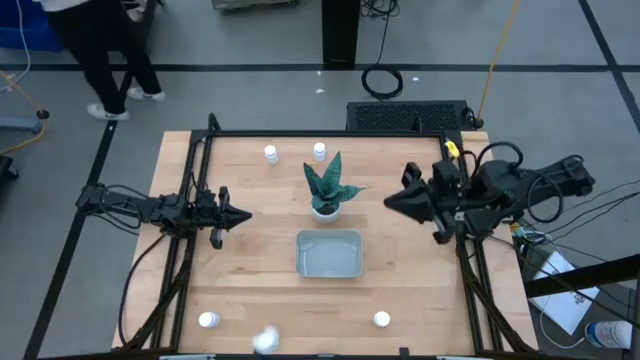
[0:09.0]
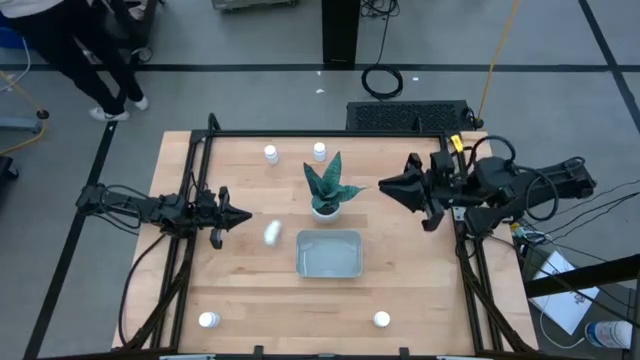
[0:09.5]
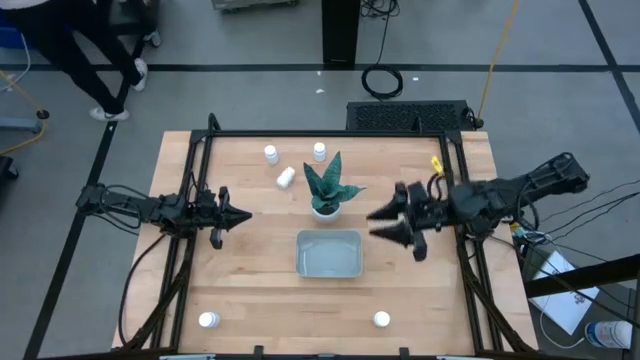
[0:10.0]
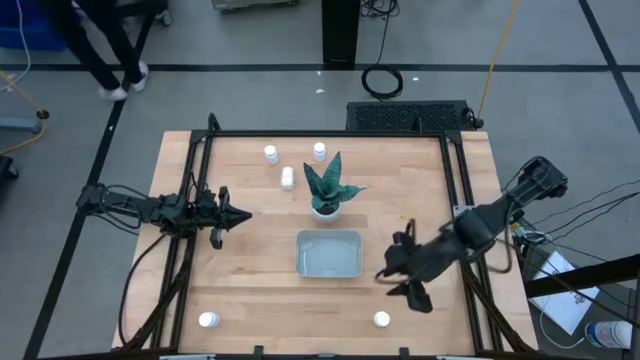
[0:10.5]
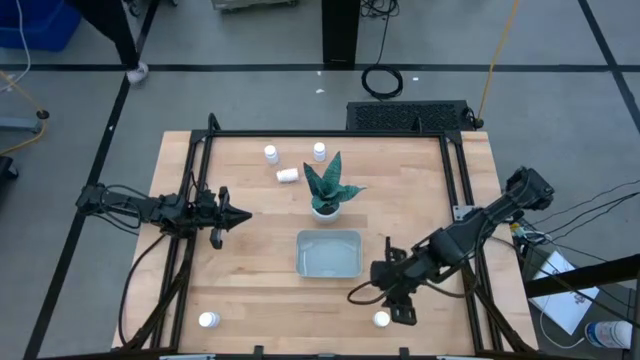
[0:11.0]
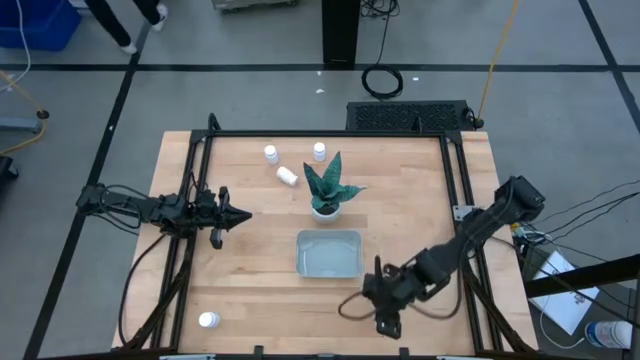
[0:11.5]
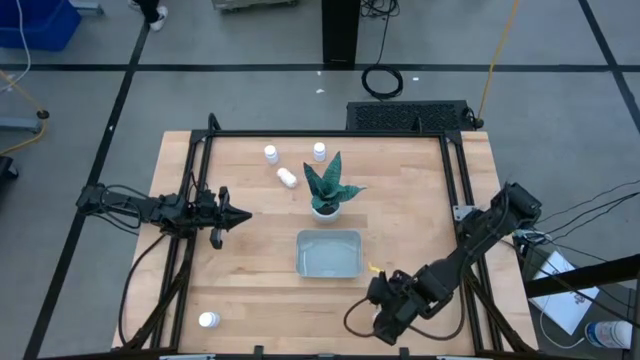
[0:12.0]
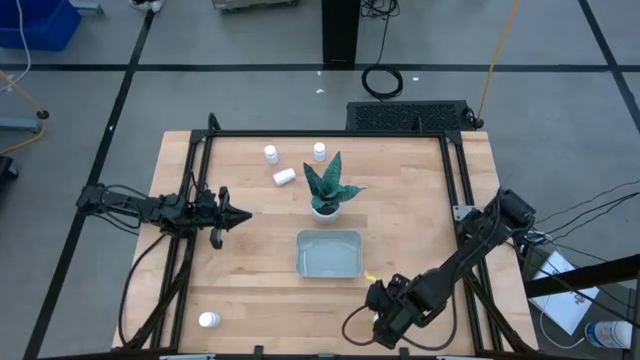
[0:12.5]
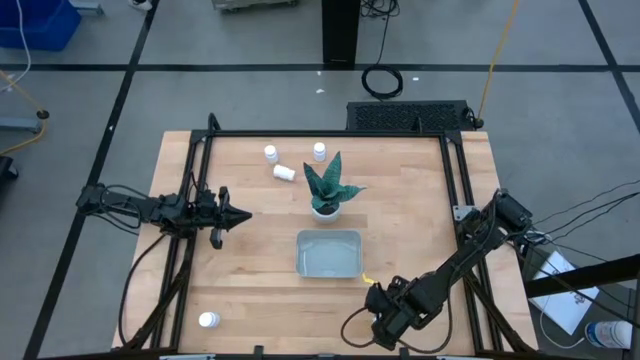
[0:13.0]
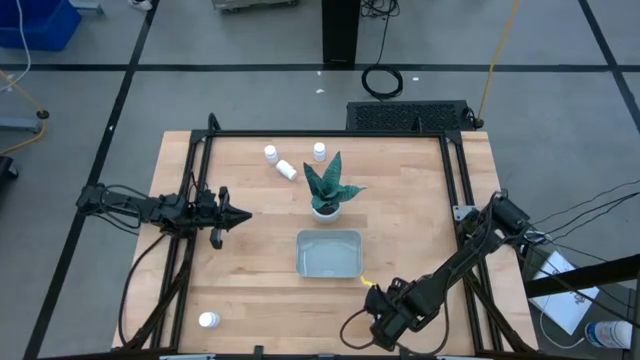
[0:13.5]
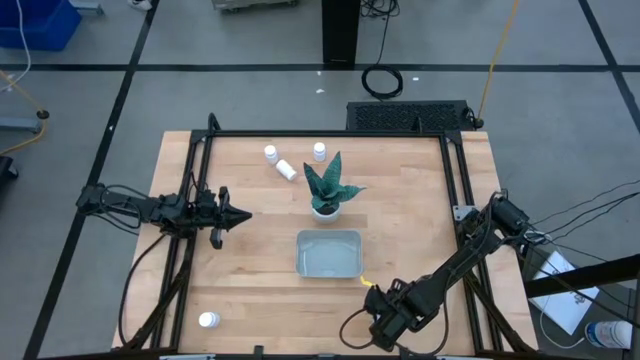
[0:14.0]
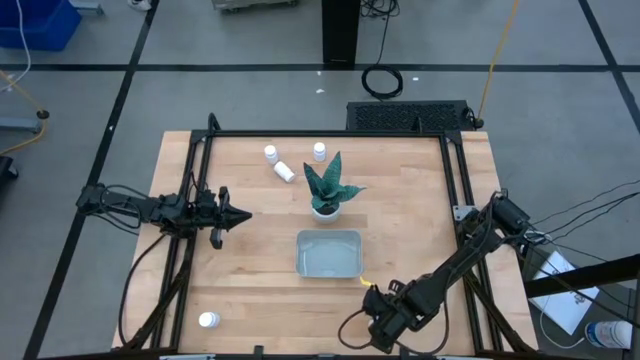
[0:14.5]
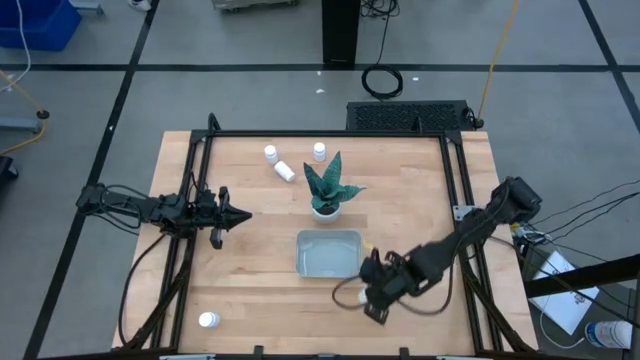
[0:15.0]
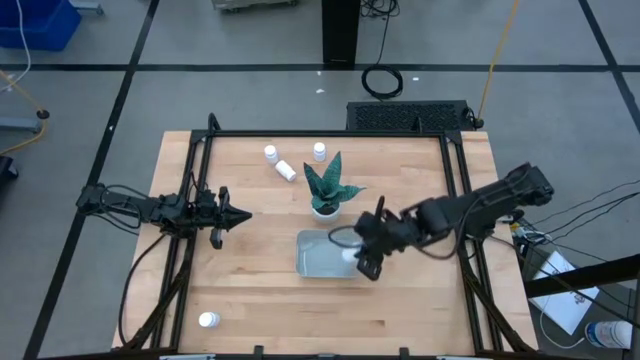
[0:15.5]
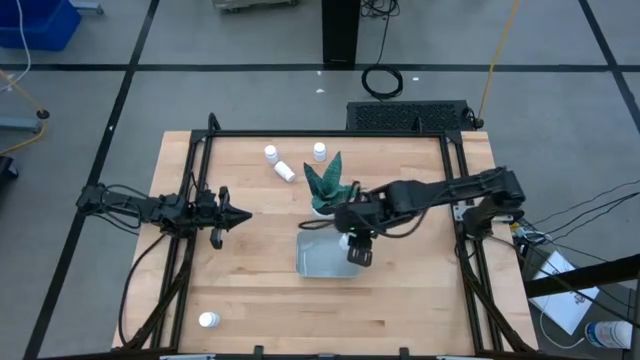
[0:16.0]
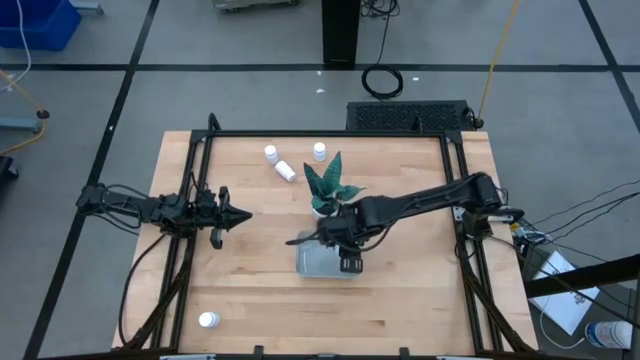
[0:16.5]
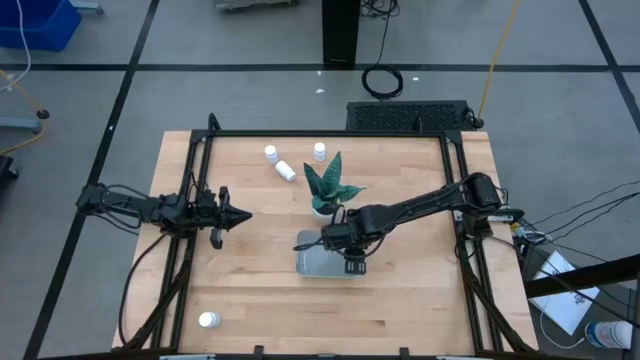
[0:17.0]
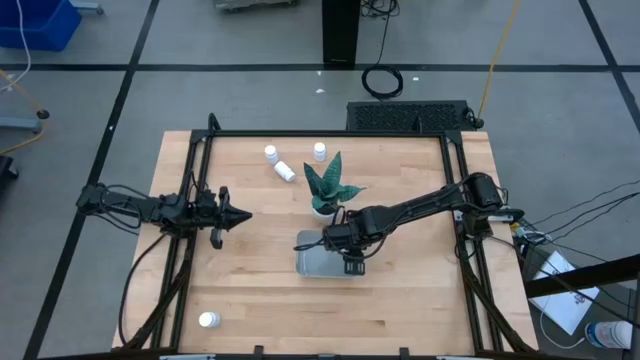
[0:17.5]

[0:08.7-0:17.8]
Task: Pick and place pill bottles into a basket
Put the white pill bottle into the gray bin

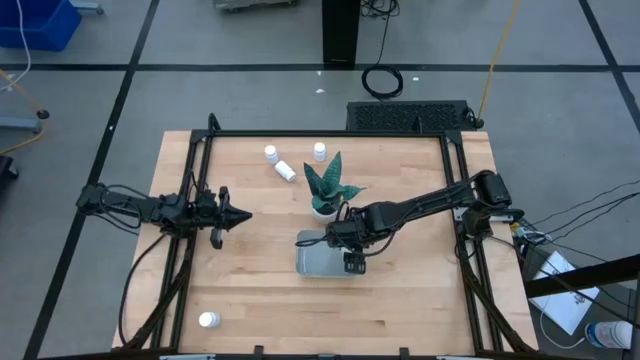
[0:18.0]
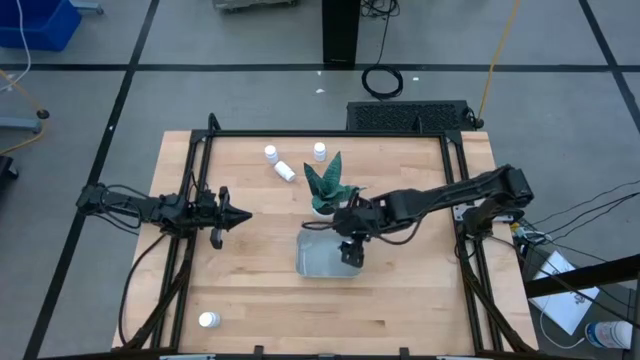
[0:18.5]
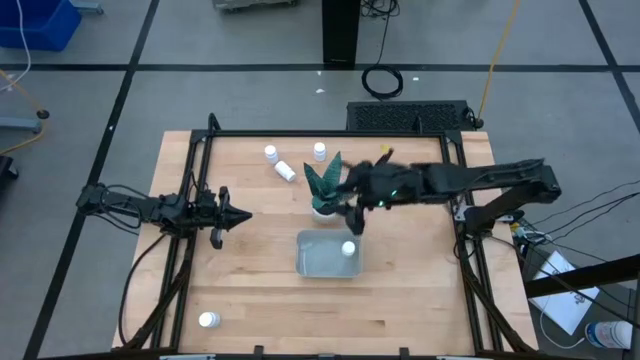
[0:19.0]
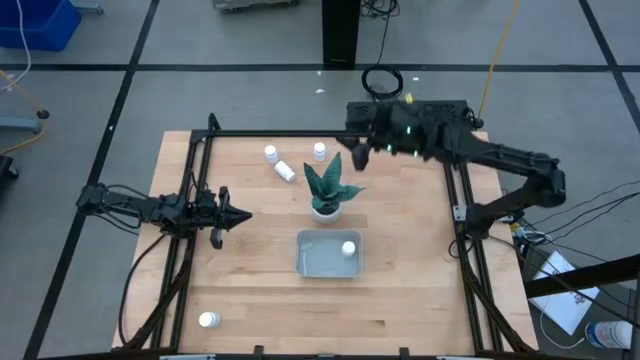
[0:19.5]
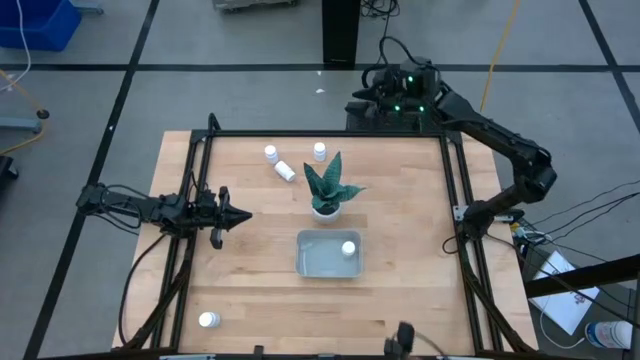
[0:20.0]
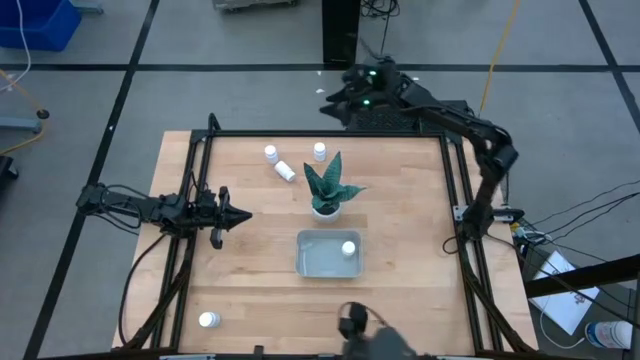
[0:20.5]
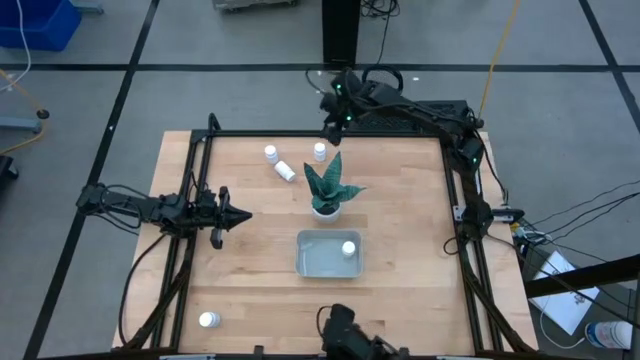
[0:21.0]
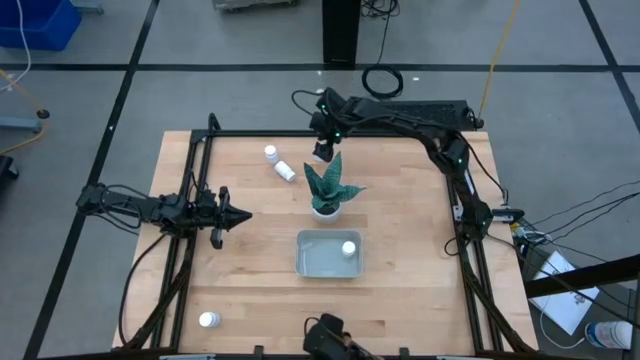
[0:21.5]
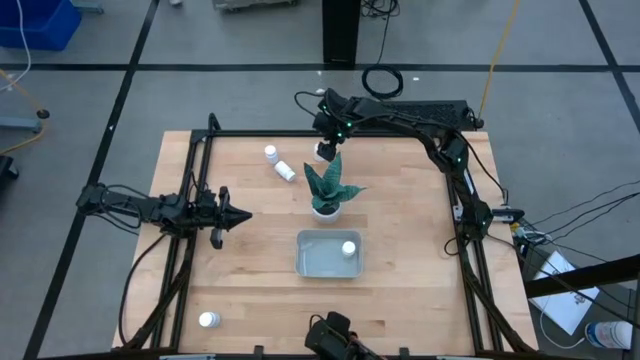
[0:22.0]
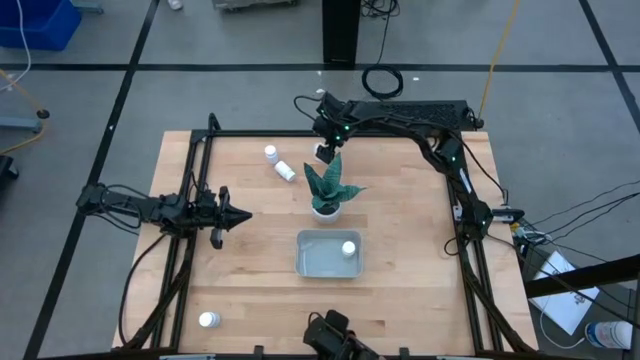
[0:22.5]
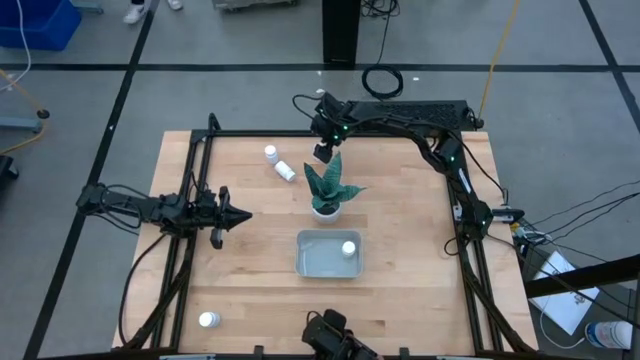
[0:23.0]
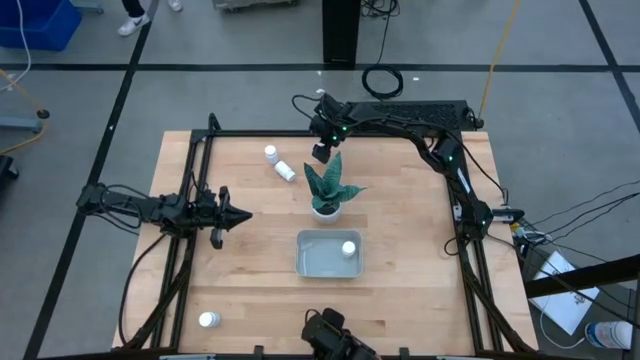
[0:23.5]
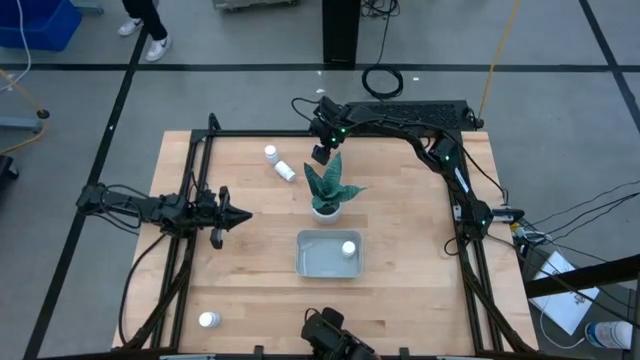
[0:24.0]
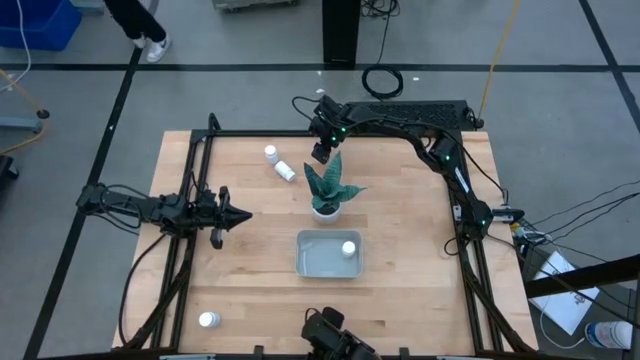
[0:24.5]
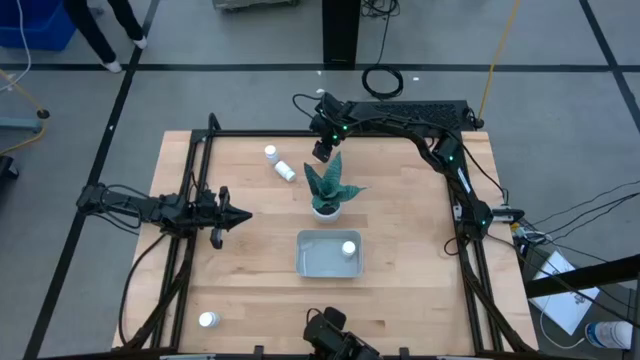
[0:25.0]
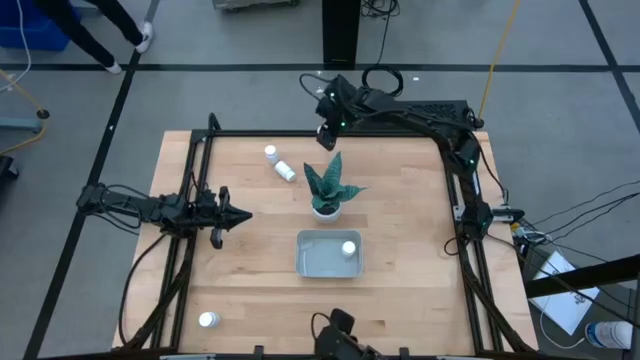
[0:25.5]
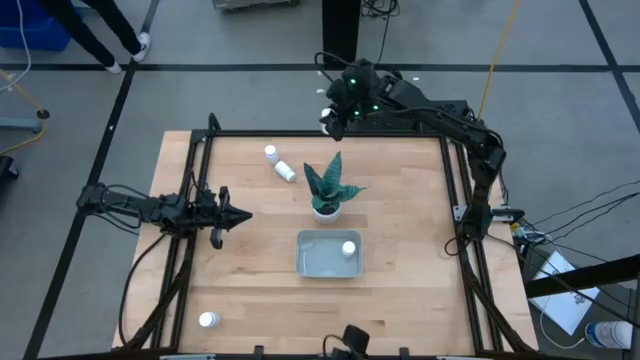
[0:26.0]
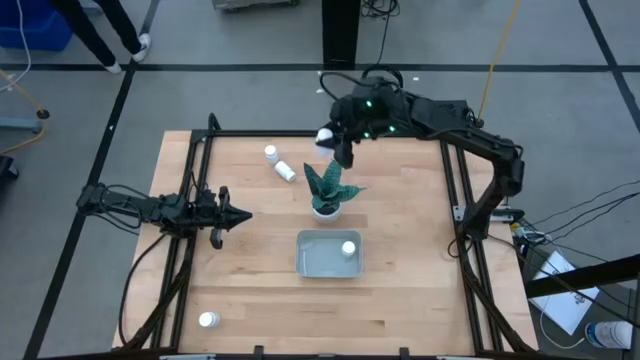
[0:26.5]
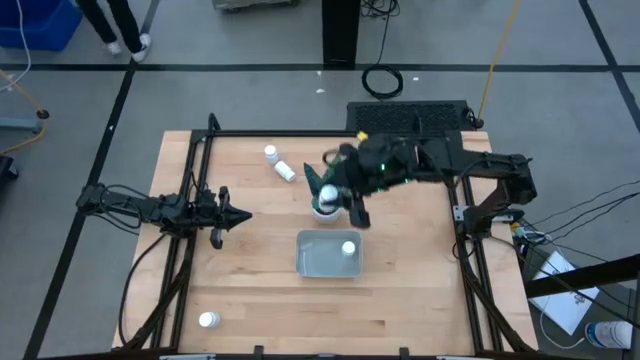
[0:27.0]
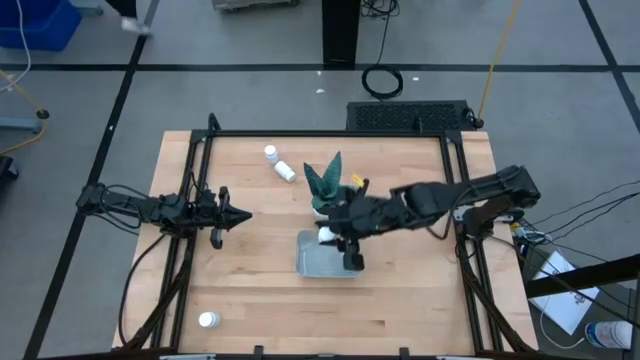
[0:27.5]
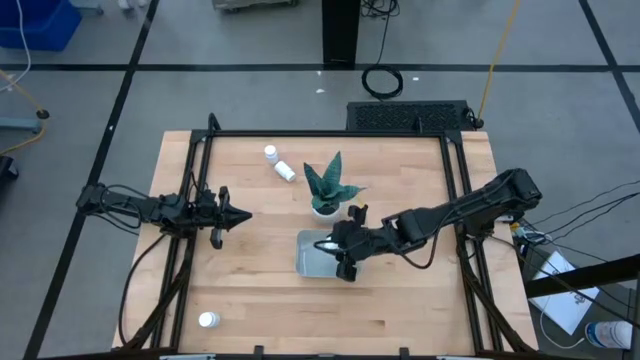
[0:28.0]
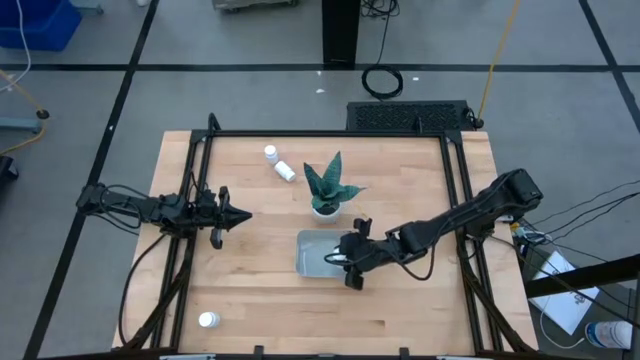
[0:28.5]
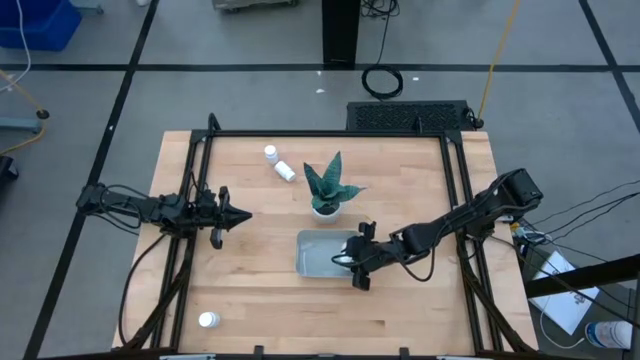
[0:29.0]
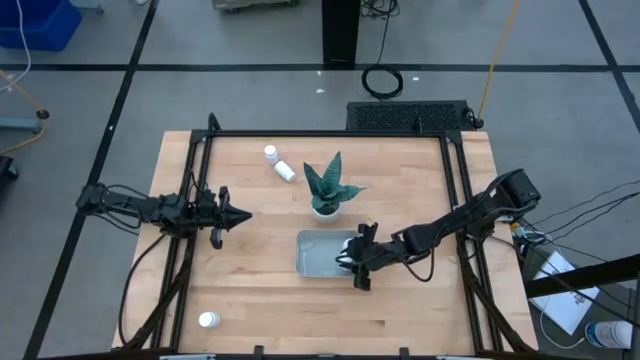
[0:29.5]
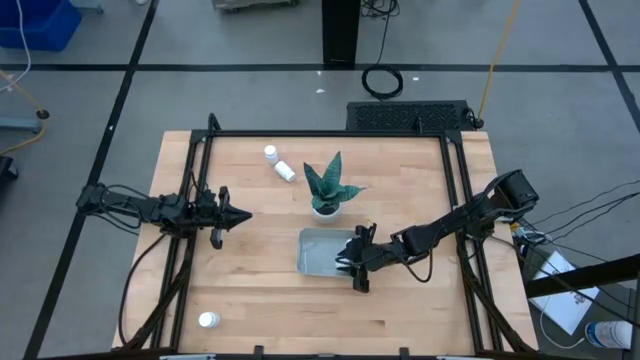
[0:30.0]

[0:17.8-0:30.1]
Put the white pill bottle into the gray bin
